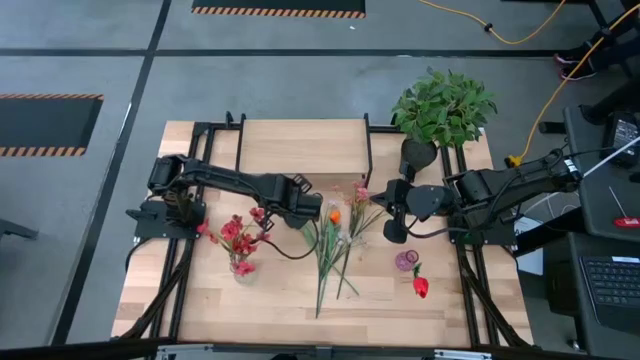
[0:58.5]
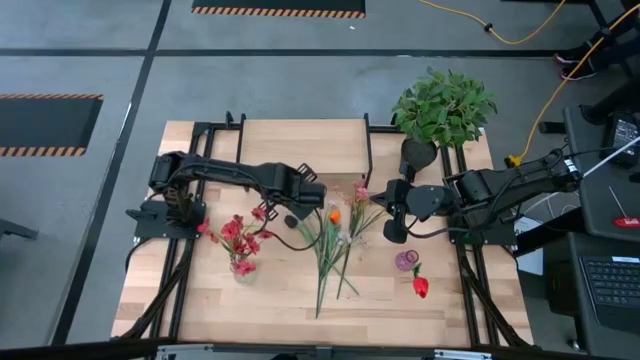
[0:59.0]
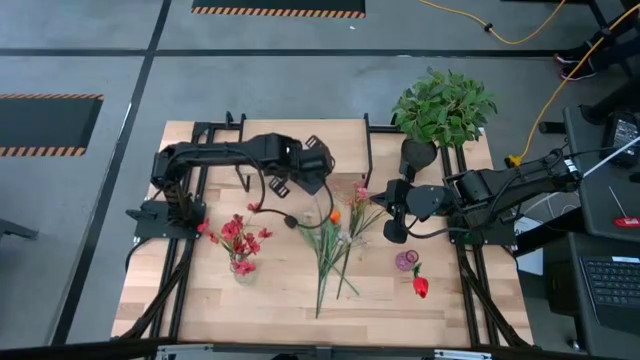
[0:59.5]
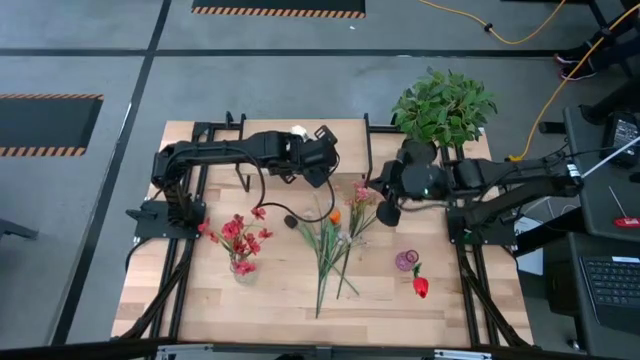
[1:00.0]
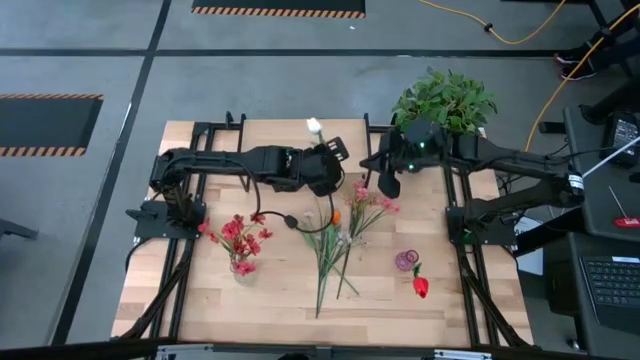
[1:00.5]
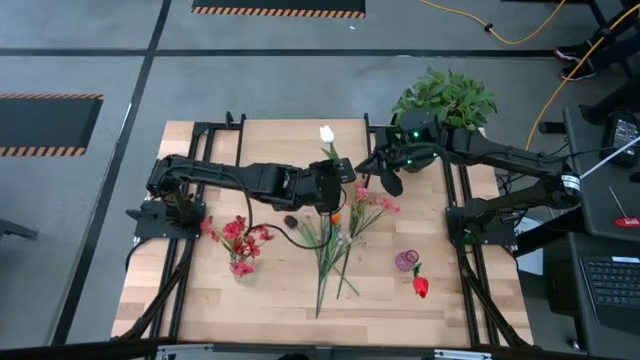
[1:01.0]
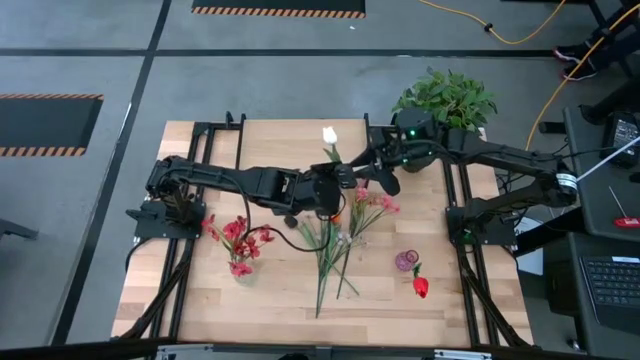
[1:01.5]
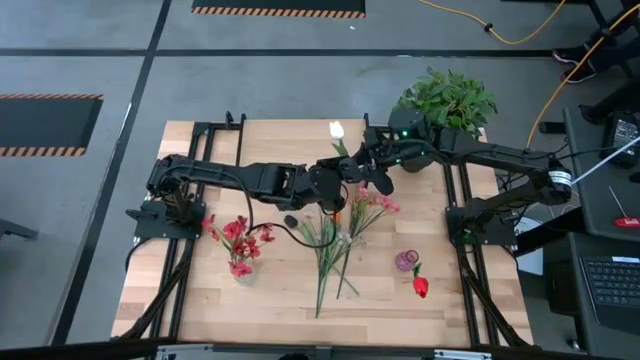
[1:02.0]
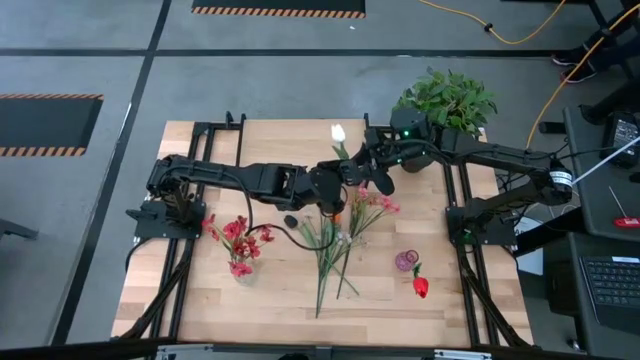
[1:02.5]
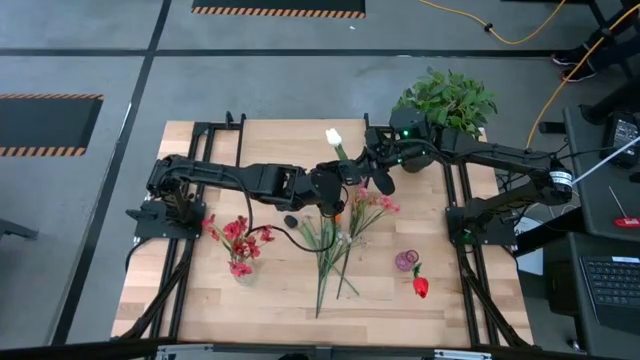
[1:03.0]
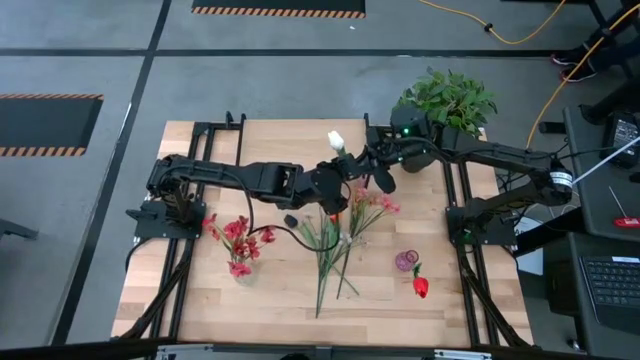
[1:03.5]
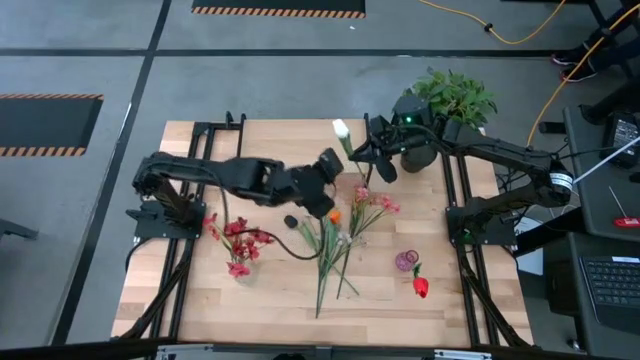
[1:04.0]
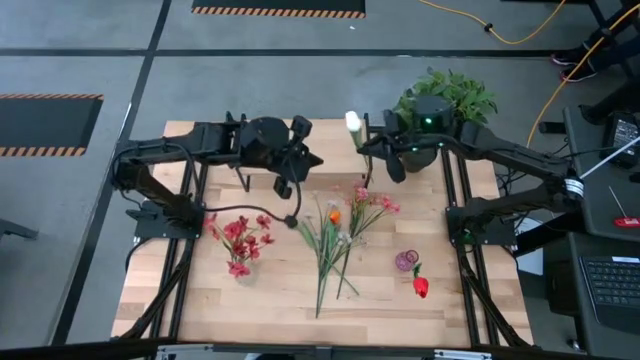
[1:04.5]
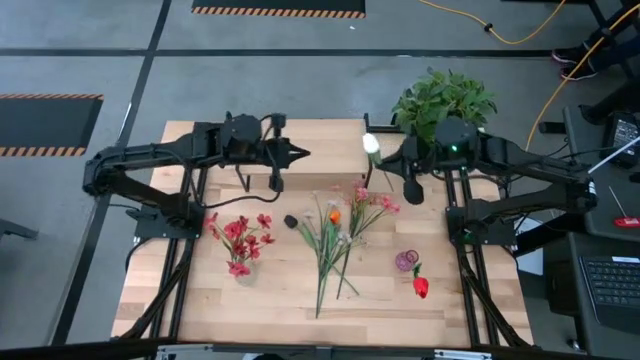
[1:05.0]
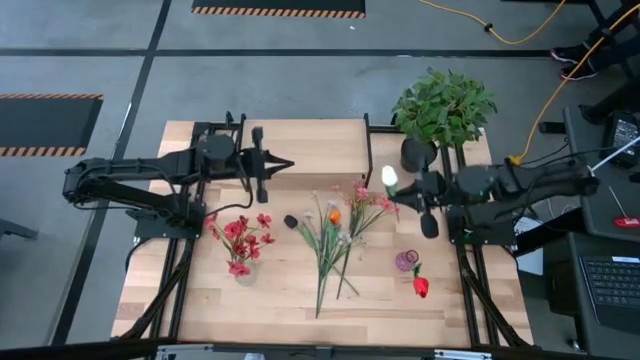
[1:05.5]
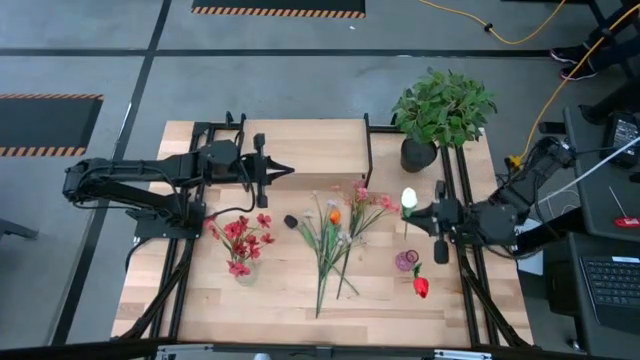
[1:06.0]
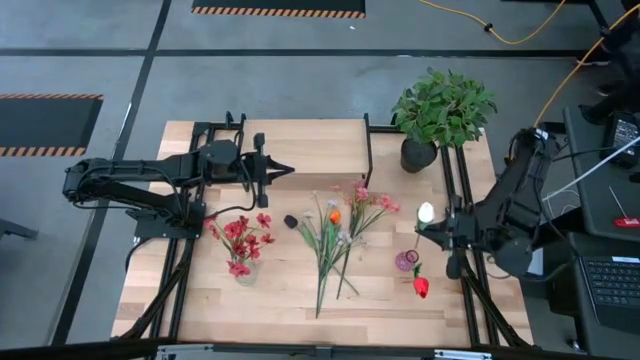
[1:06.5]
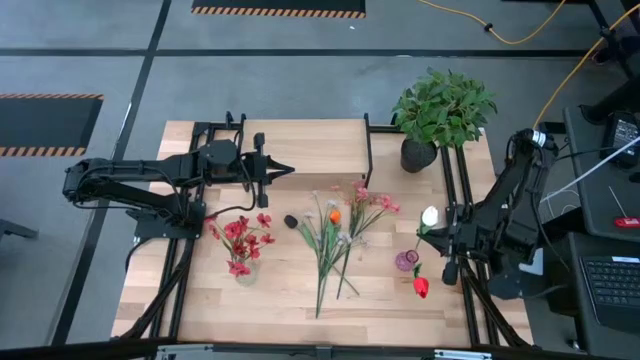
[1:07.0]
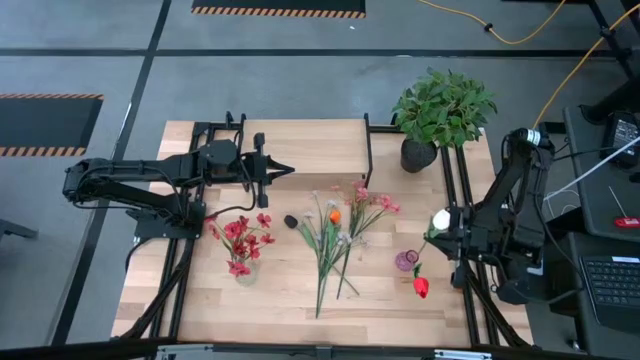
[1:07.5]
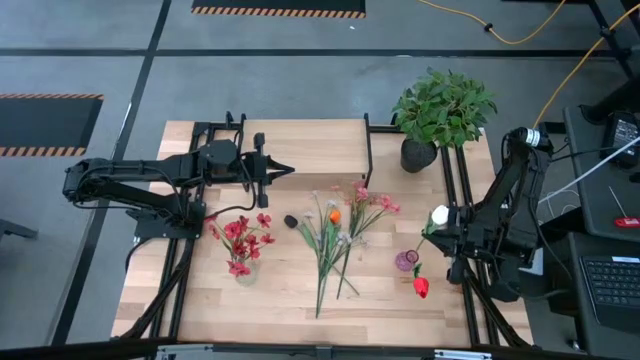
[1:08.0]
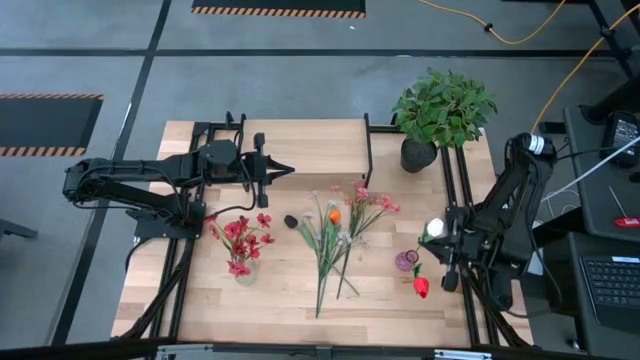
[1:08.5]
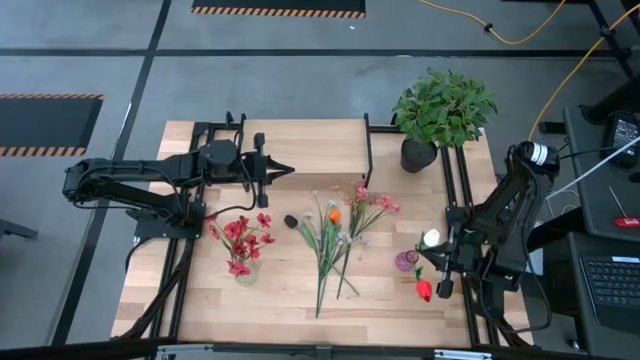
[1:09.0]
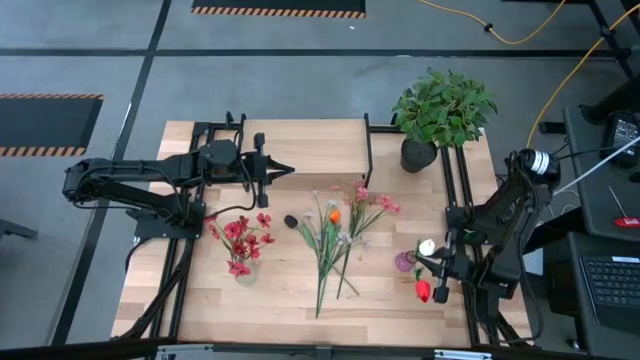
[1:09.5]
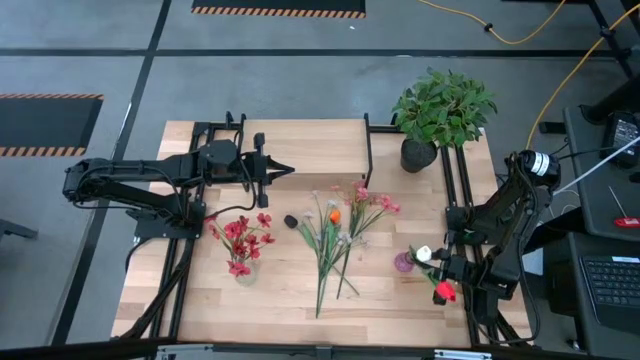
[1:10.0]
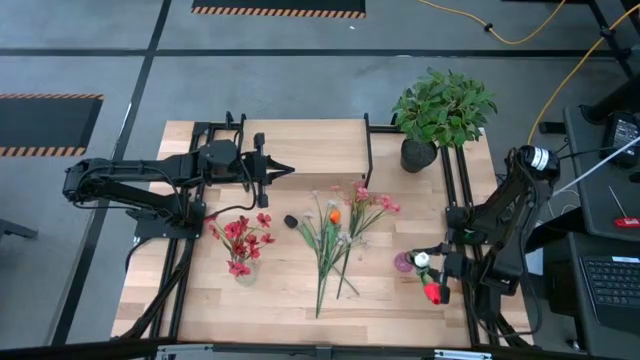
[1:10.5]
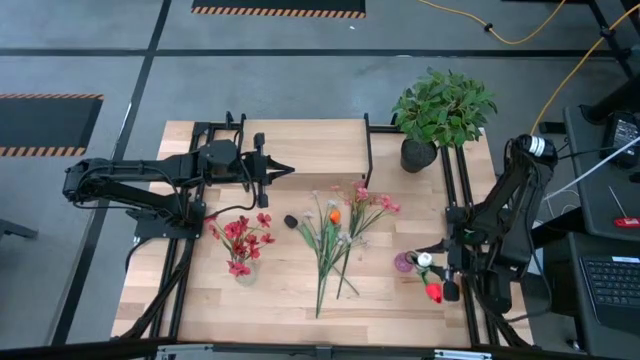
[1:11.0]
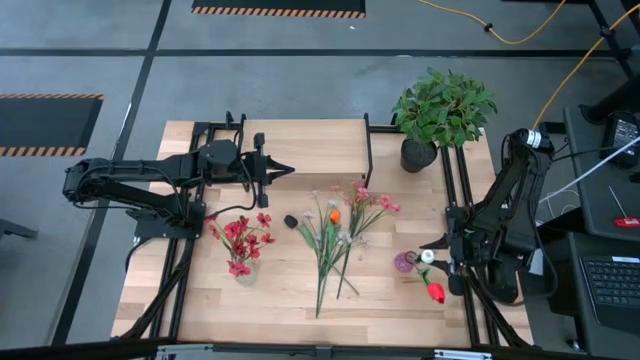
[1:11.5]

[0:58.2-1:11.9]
Task: Pick and place flowers into a vace then onto a shelf
Put the white flower into the pink vase
